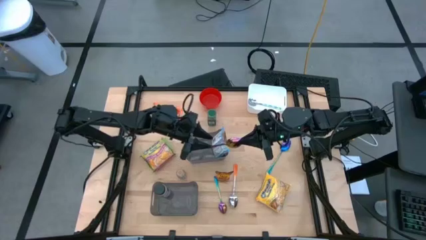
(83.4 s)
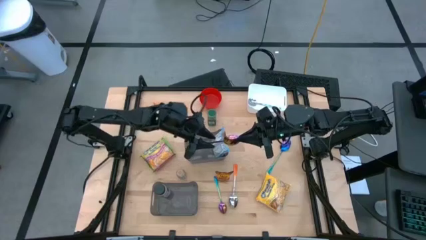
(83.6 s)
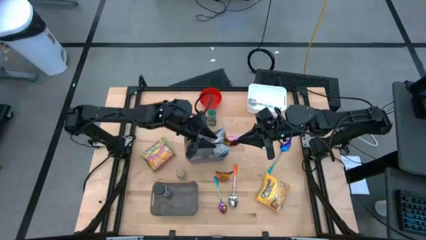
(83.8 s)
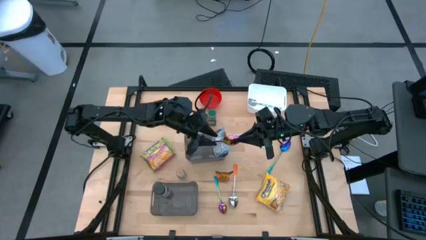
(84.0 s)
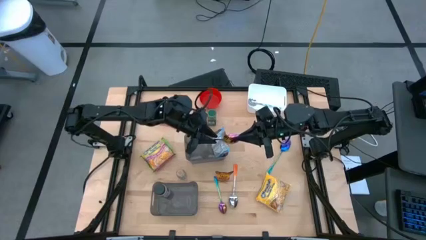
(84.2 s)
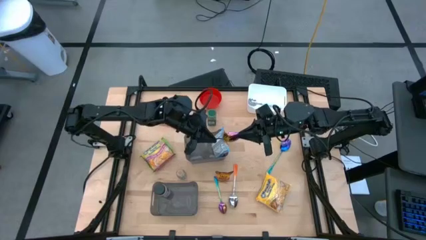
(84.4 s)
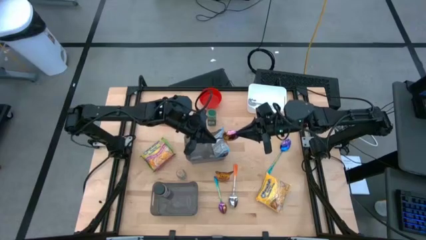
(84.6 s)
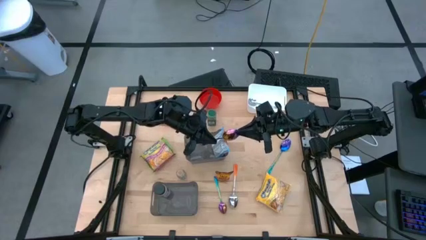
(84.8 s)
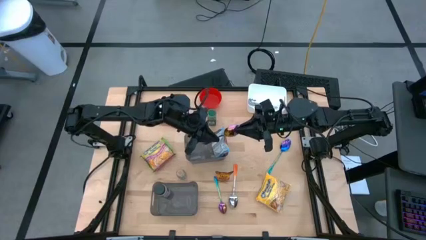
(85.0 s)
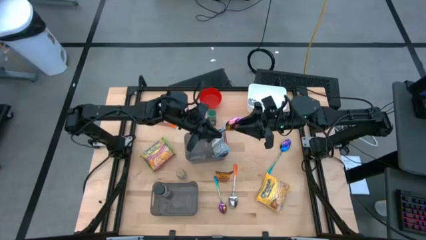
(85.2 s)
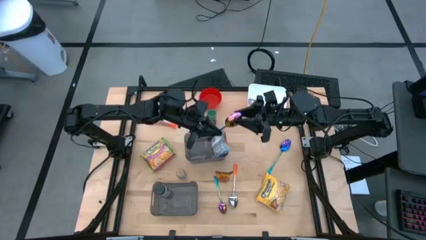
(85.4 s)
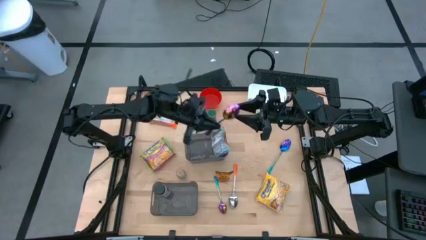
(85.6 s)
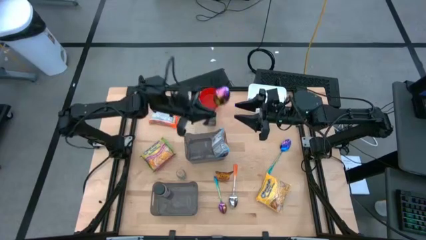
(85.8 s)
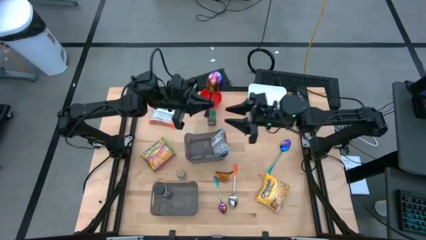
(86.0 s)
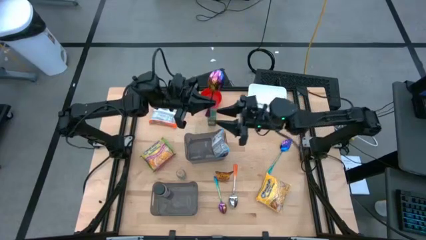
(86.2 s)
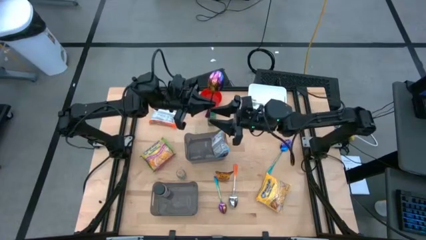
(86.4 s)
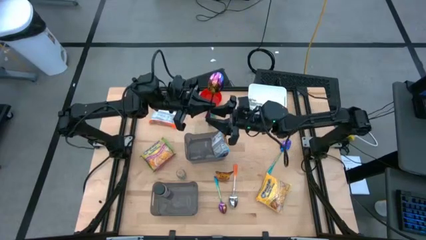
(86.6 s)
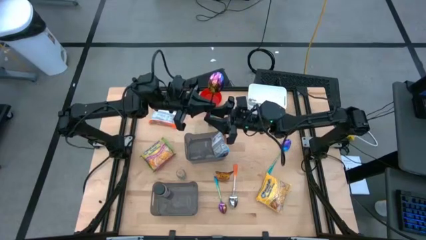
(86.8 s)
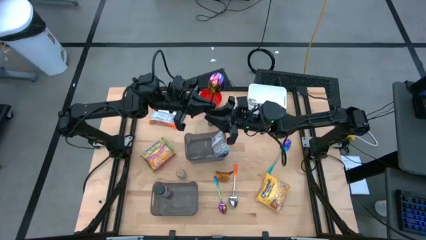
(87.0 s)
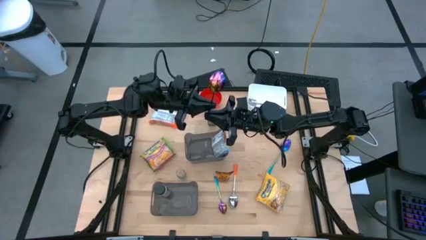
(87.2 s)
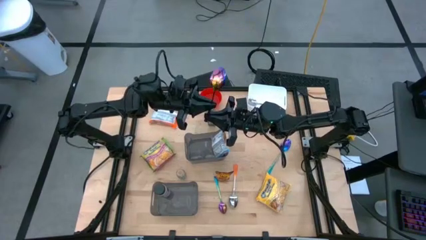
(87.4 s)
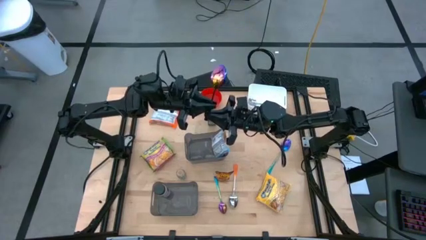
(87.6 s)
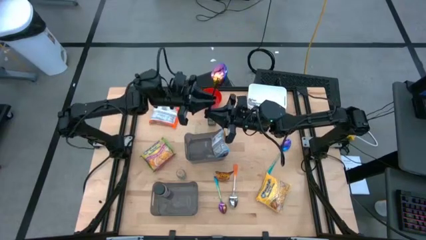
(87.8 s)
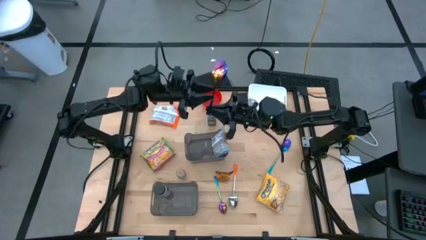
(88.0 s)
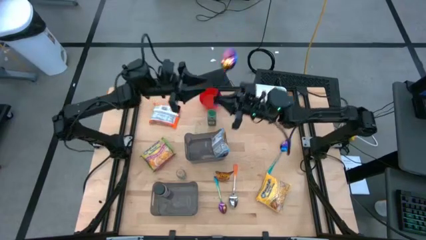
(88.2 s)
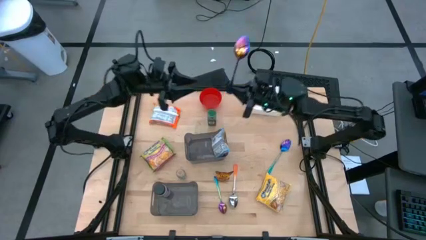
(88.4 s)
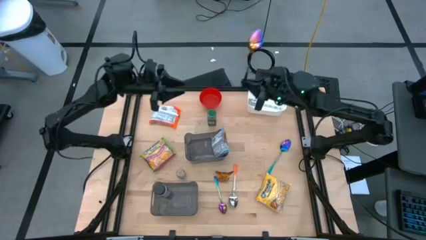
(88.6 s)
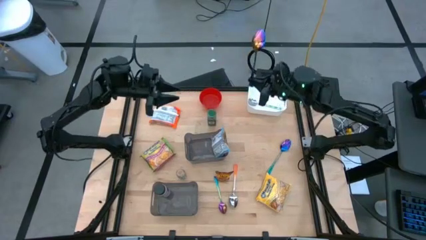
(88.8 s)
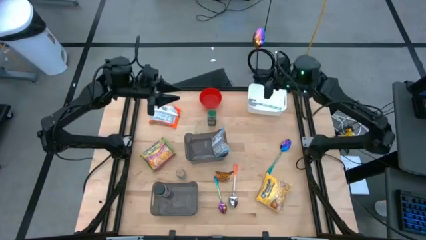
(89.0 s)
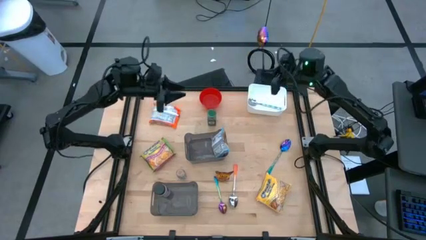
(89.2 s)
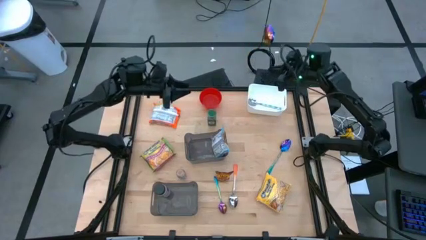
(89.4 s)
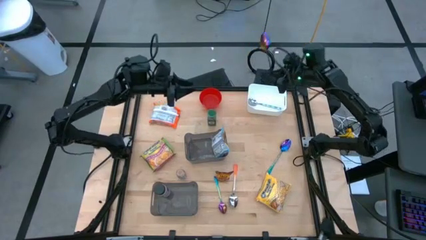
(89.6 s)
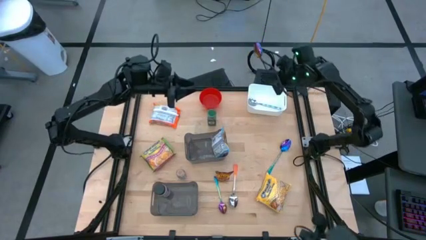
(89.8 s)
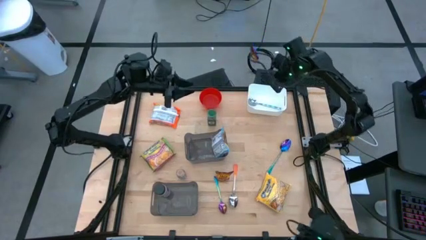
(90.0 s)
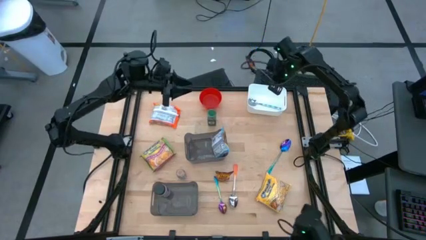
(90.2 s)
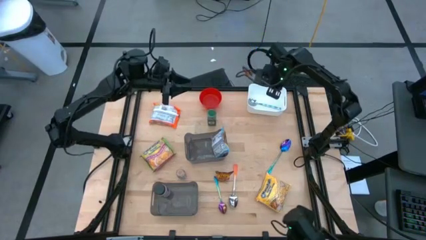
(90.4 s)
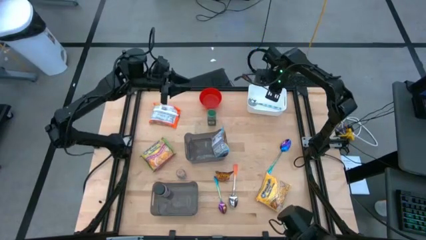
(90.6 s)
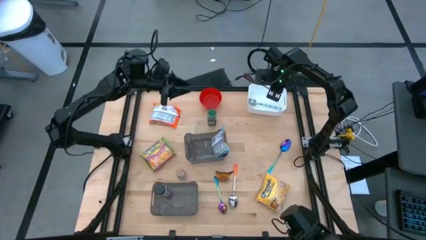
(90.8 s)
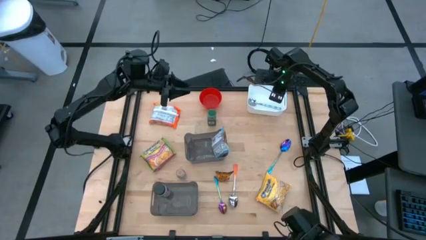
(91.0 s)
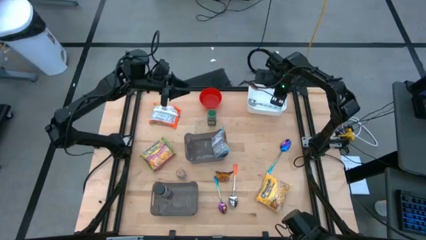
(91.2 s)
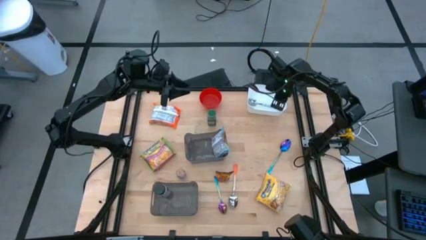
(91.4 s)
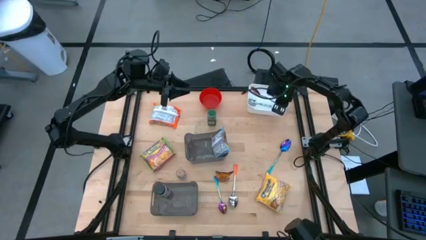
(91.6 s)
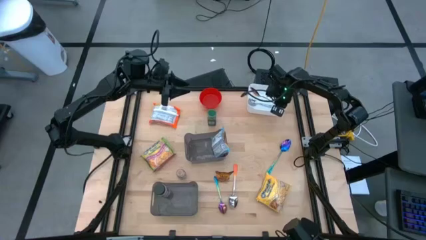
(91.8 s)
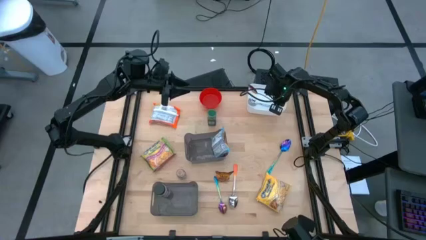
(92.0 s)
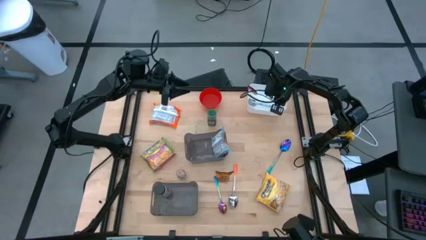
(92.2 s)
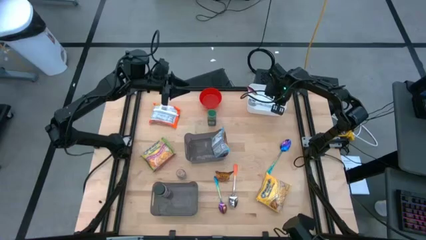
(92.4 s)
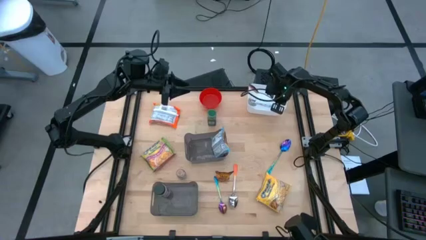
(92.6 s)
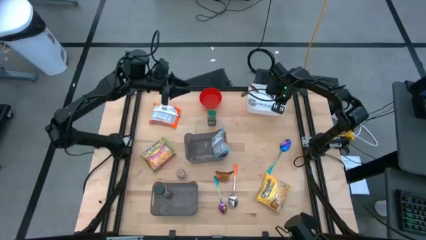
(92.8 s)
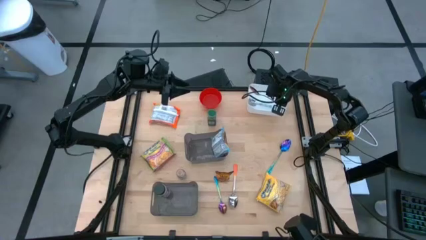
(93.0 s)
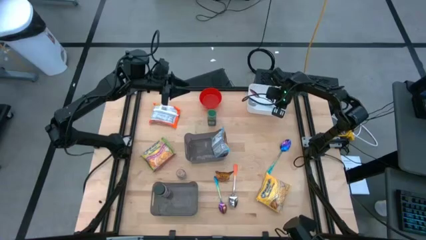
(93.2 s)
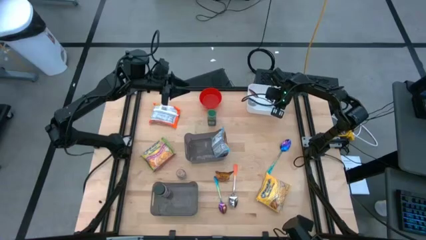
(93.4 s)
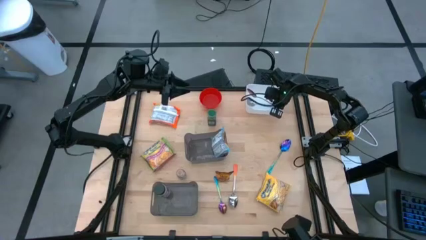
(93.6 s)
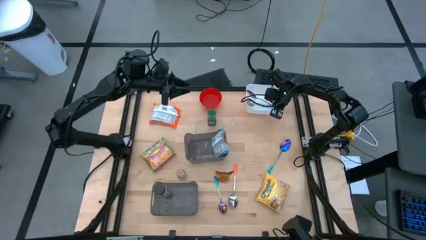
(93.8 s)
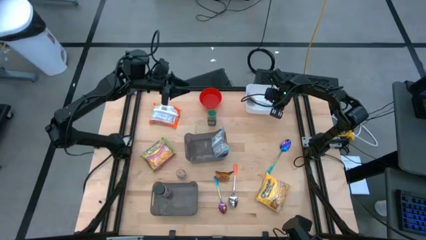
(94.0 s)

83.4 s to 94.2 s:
Task: Pick & Place Food Item
Put the top left purple spoon into the white bin

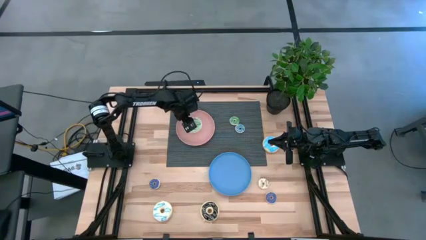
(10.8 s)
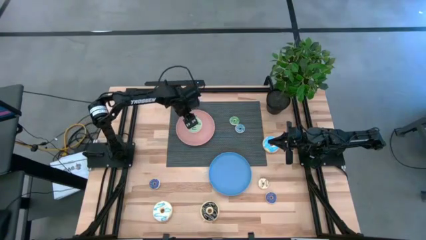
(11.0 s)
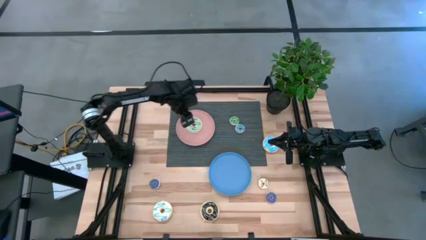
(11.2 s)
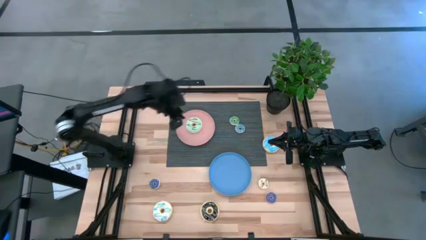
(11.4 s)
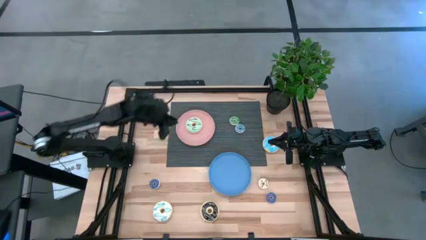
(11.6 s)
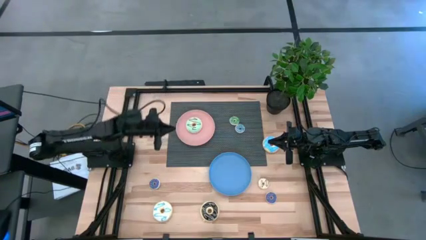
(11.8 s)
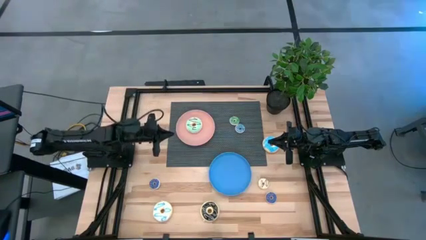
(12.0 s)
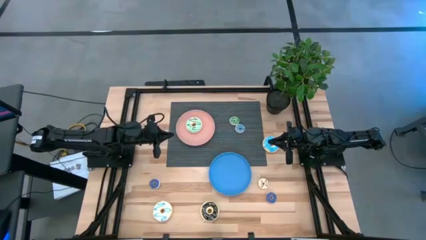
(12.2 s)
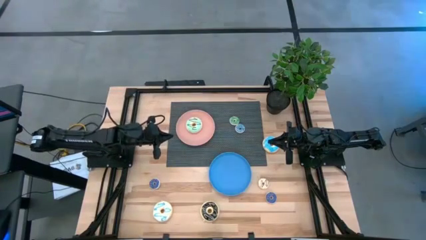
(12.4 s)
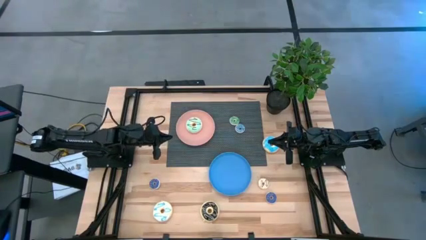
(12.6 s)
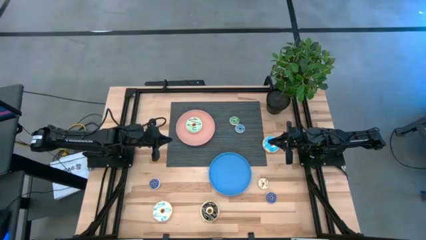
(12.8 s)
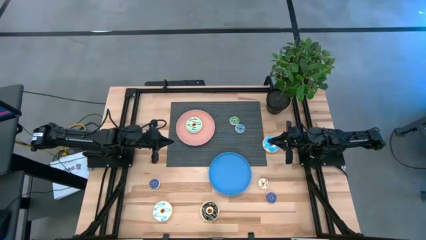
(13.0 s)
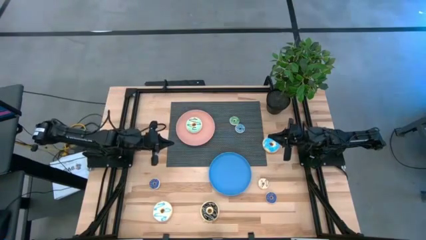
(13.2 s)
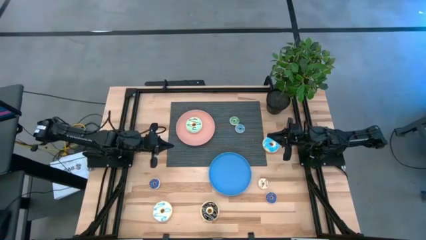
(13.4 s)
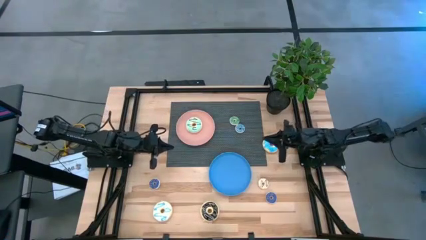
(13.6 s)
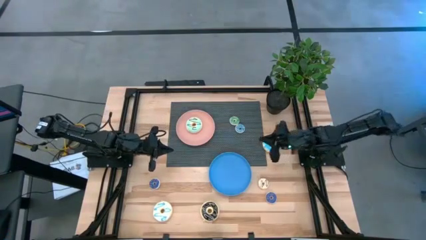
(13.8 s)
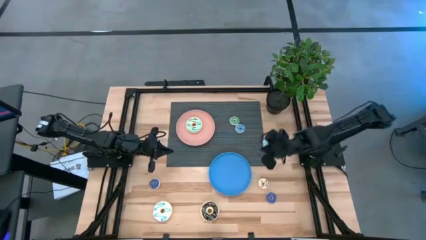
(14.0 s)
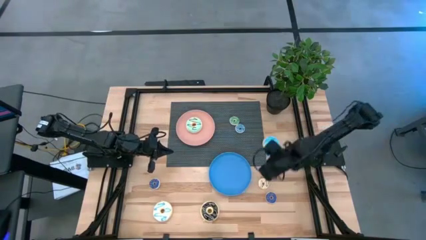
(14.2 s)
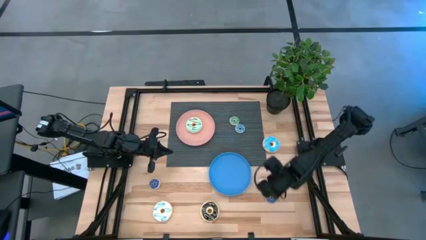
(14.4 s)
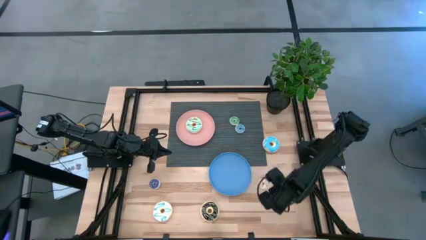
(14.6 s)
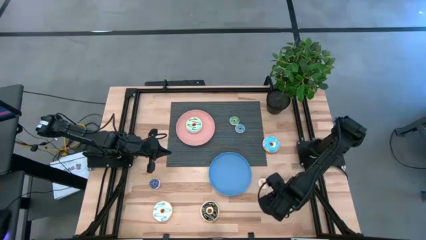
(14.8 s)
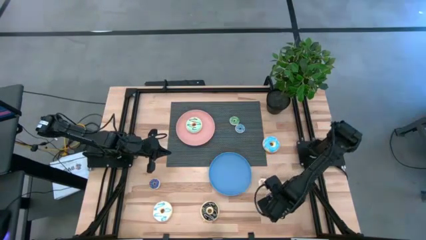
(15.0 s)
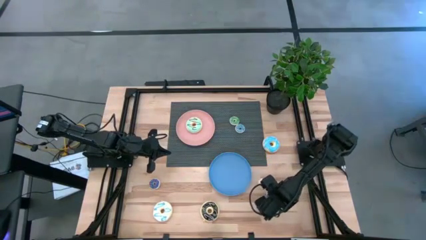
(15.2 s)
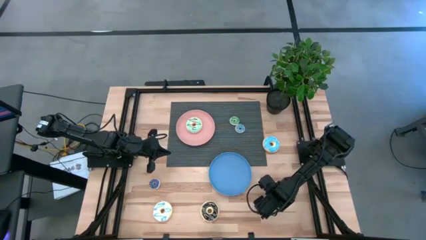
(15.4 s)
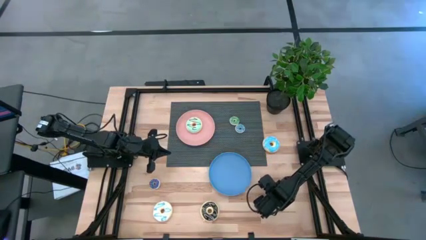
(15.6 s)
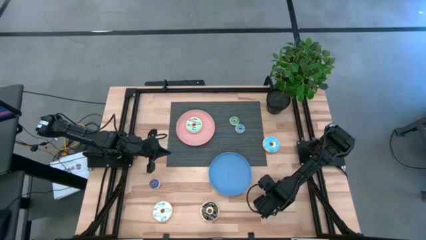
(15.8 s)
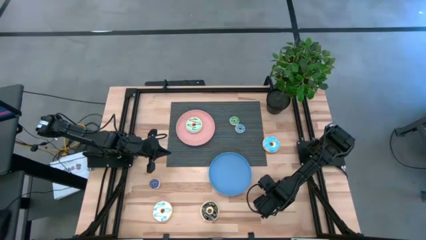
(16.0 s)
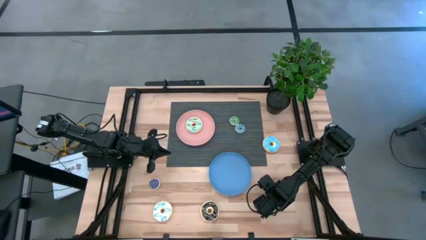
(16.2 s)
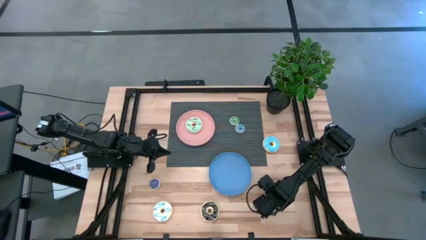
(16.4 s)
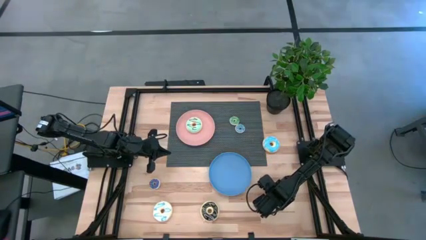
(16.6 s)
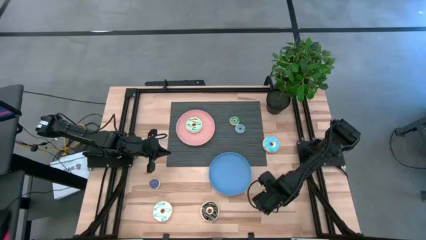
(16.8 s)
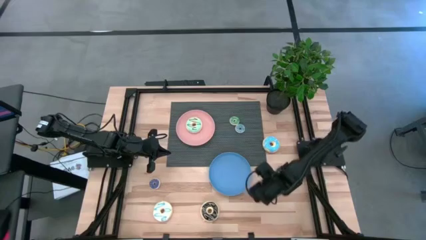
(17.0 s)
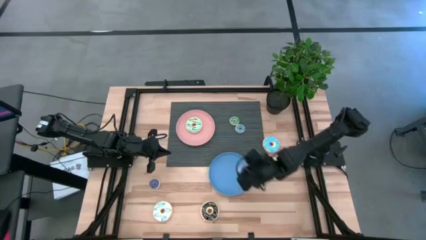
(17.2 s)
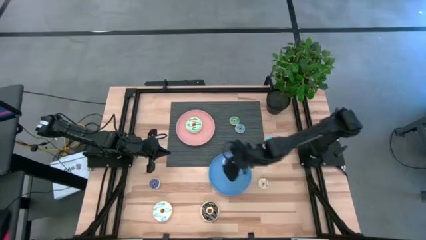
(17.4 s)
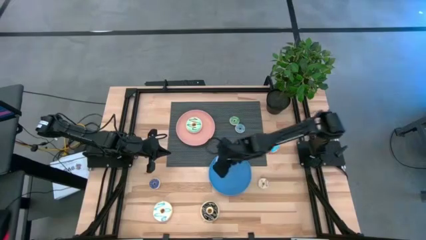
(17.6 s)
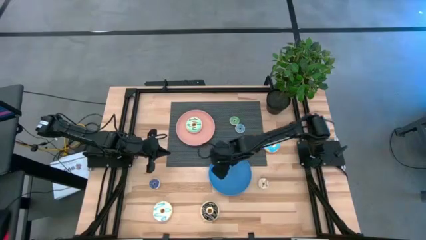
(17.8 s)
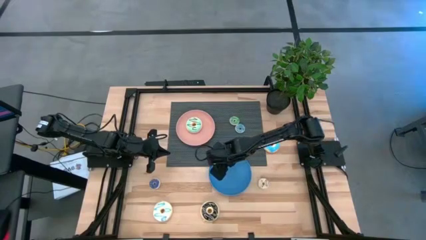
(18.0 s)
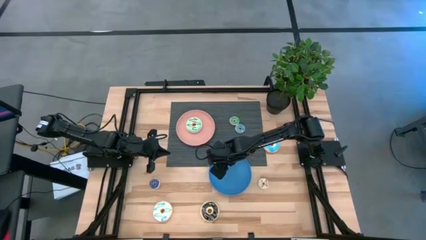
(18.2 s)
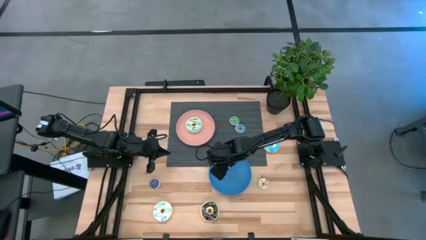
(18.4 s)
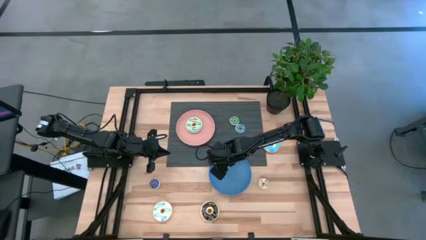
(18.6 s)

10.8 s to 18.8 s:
Task: Pick & Place donuts
Put the right small blue donut into the blue plate
